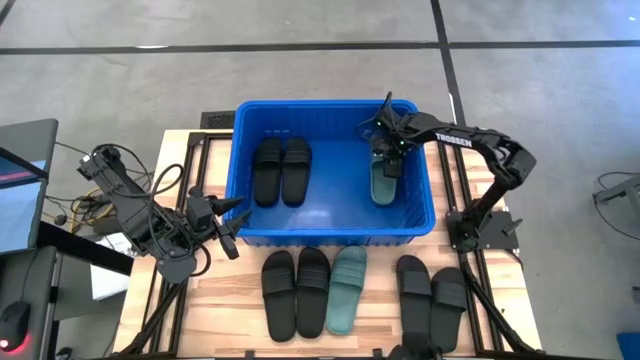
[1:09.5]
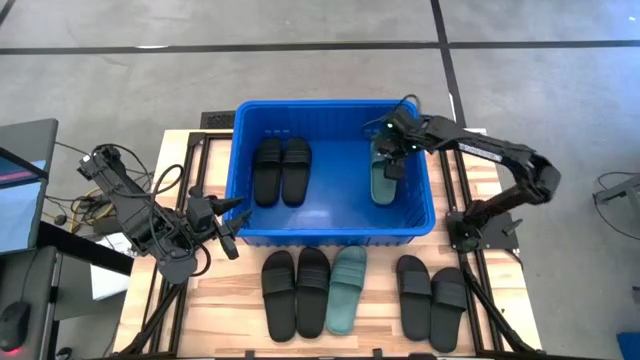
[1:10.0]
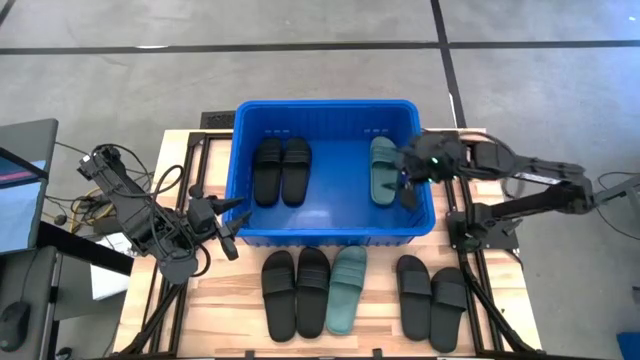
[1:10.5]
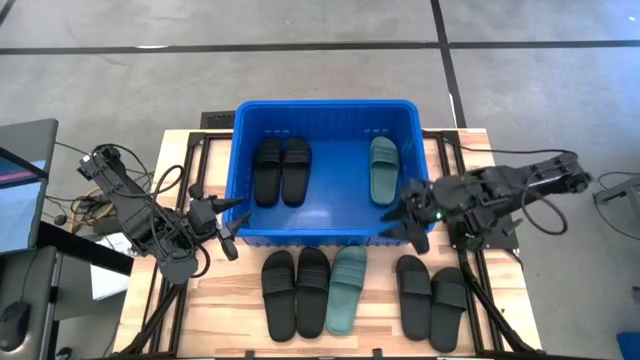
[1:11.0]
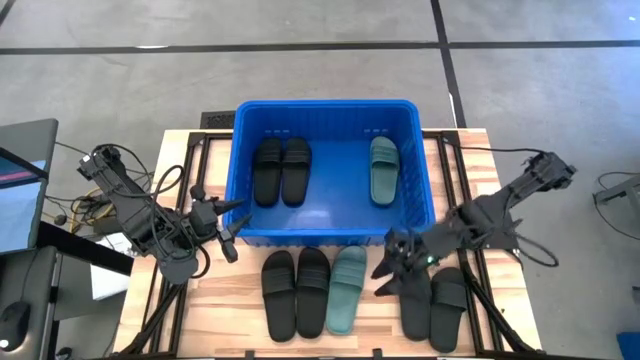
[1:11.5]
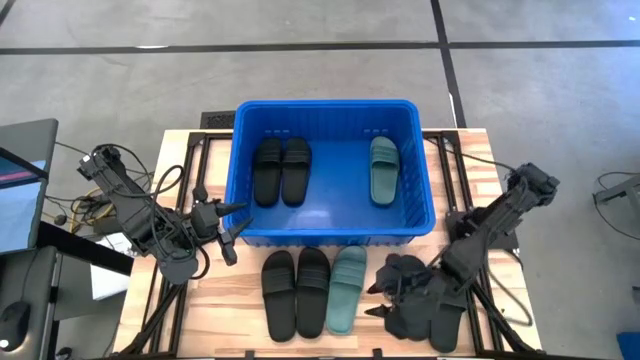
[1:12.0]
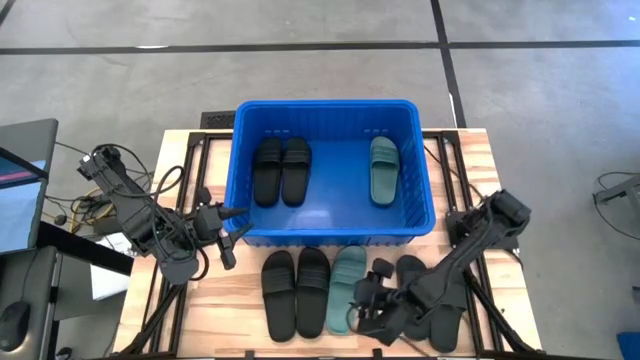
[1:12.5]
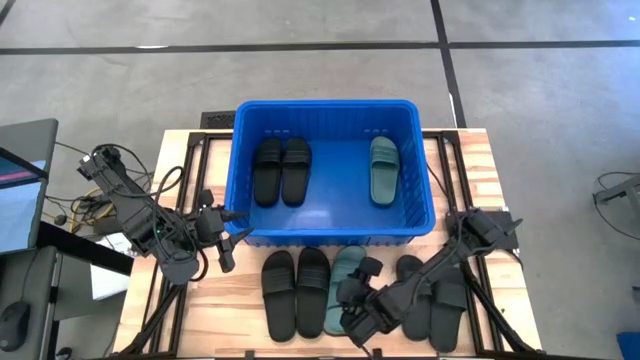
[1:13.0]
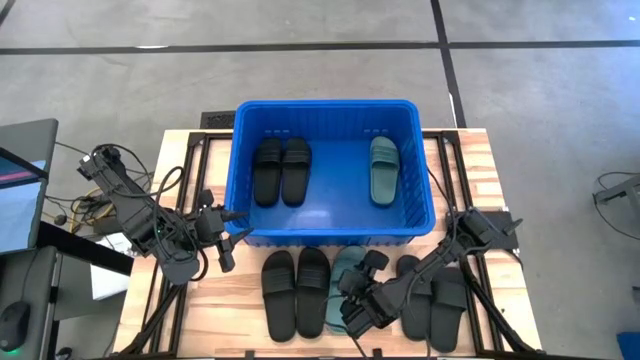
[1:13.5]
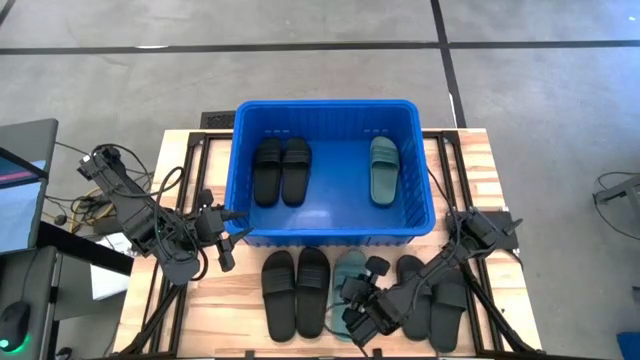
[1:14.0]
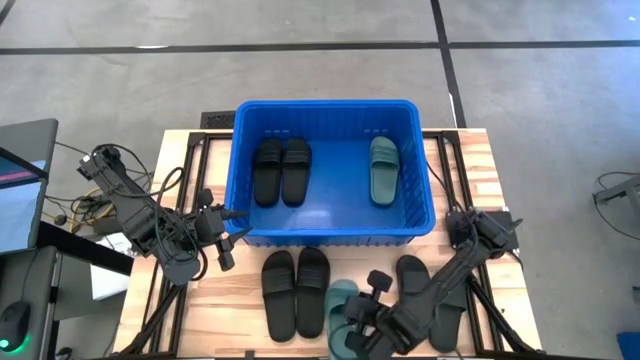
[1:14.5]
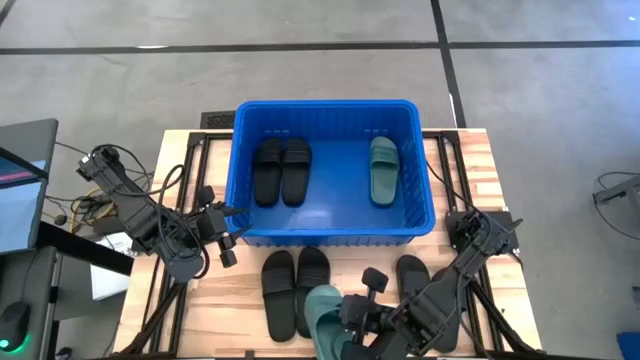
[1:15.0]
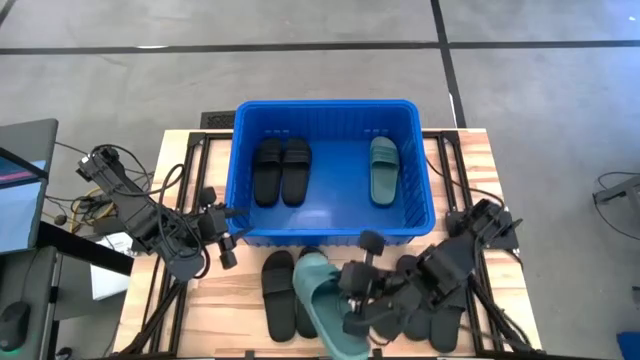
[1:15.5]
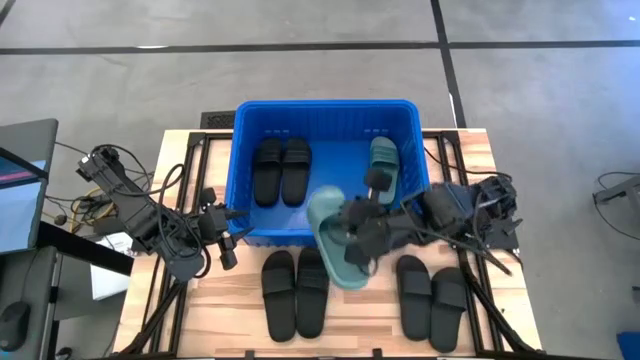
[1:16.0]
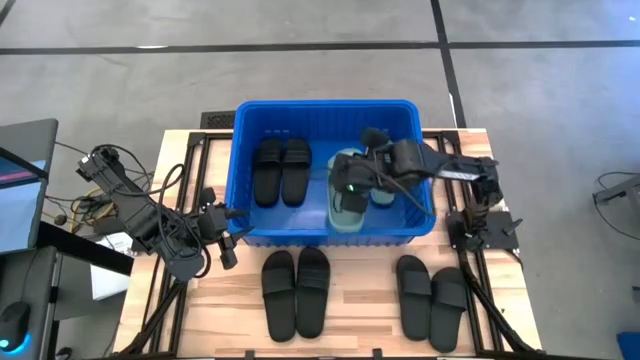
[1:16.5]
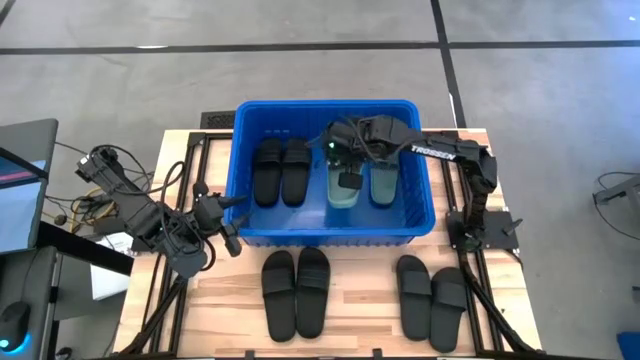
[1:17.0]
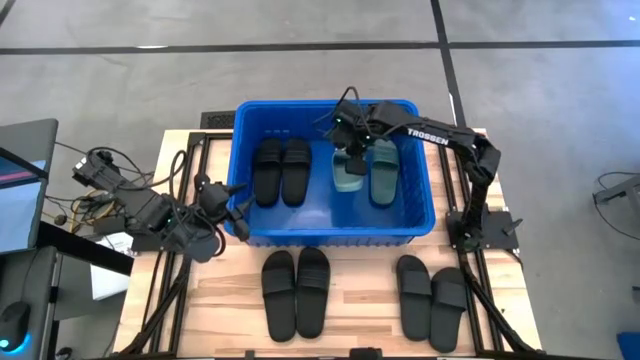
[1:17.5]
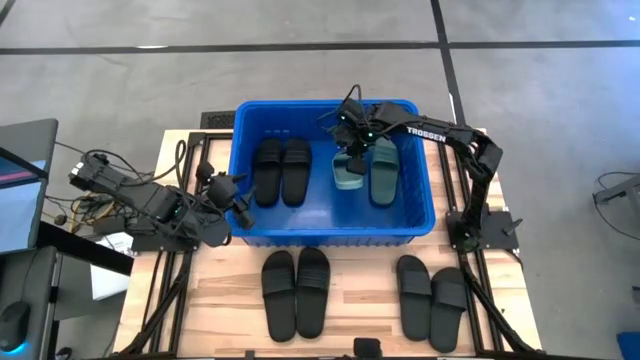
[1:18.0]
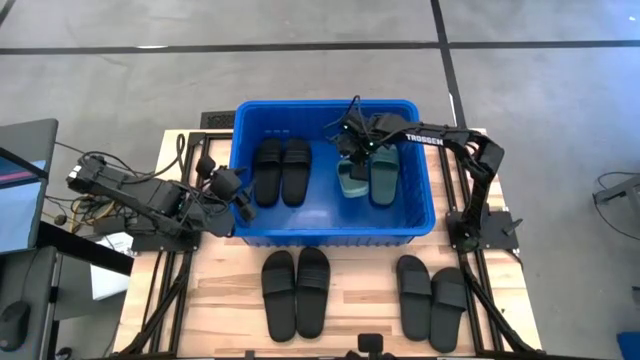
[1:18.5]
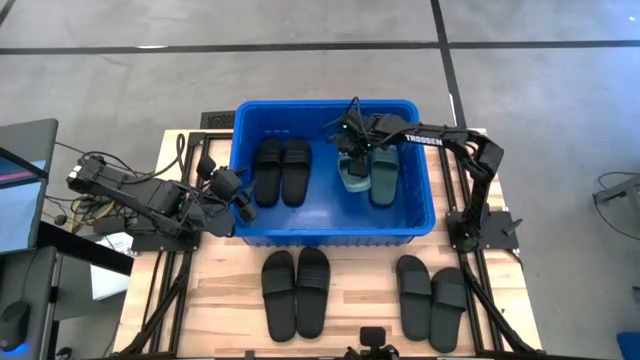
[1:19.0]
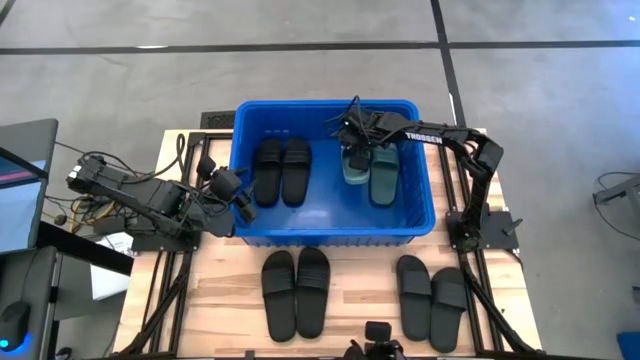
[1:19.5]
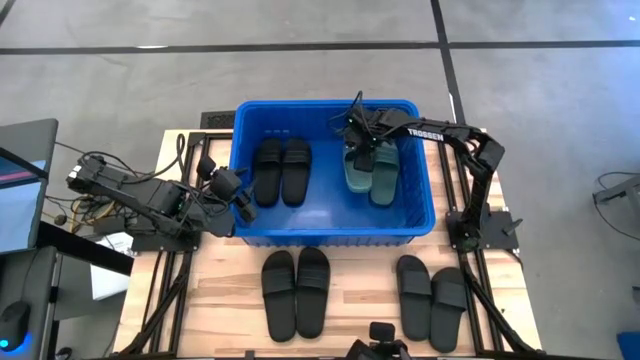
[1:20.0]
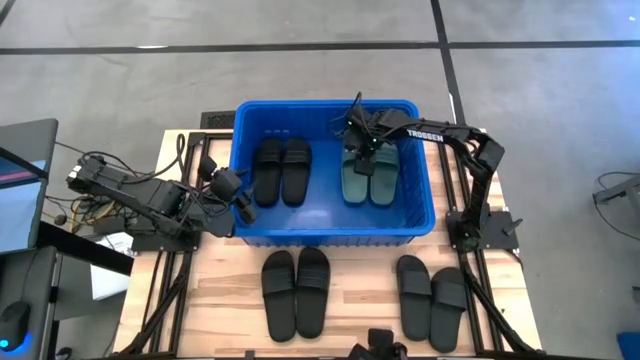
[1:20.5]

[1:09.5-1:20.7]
Task: Pick and place slides into bin
Put the green slide into the blue bin

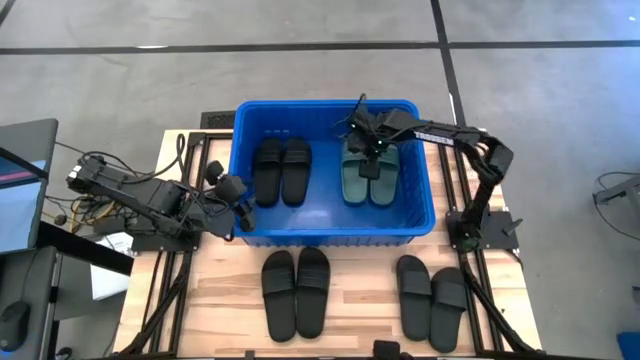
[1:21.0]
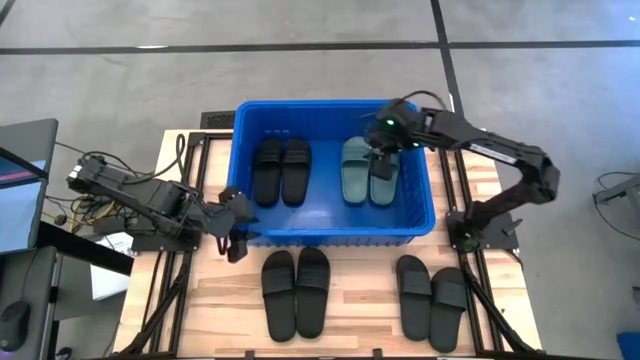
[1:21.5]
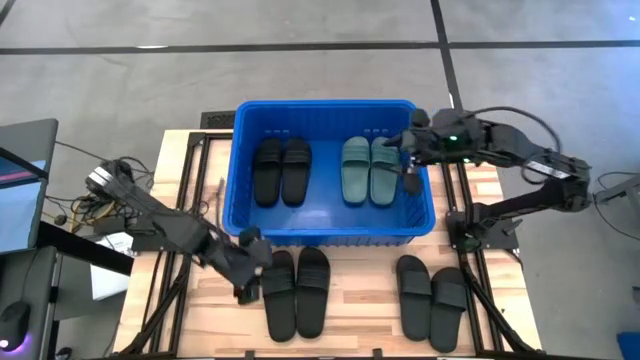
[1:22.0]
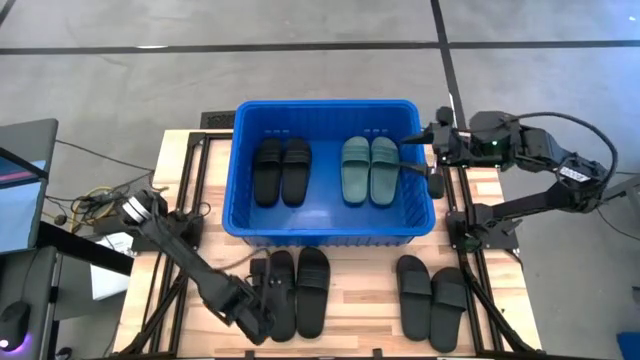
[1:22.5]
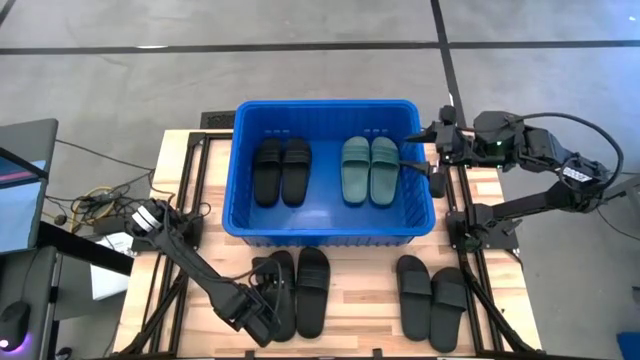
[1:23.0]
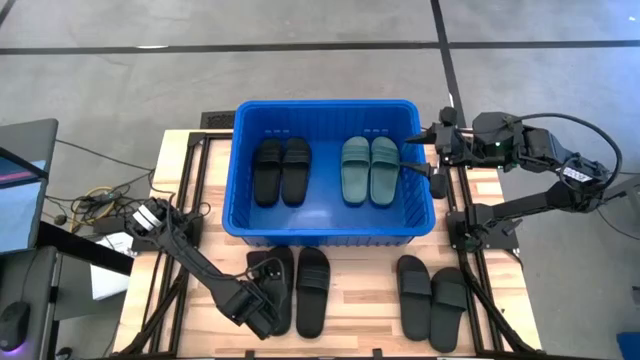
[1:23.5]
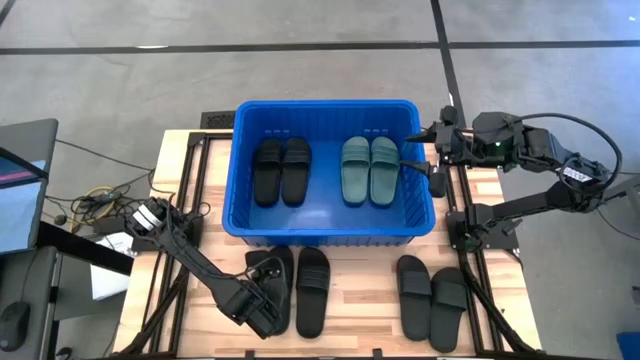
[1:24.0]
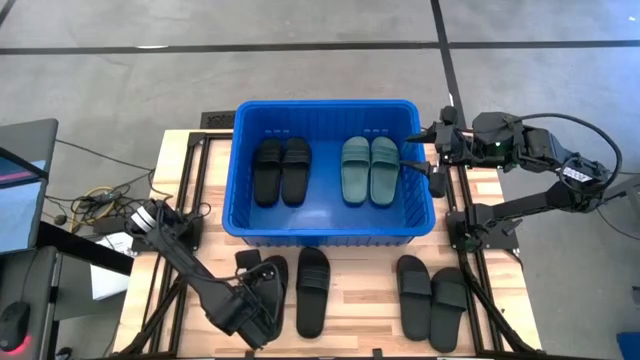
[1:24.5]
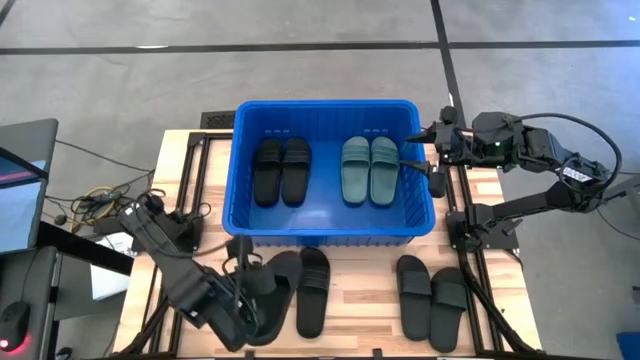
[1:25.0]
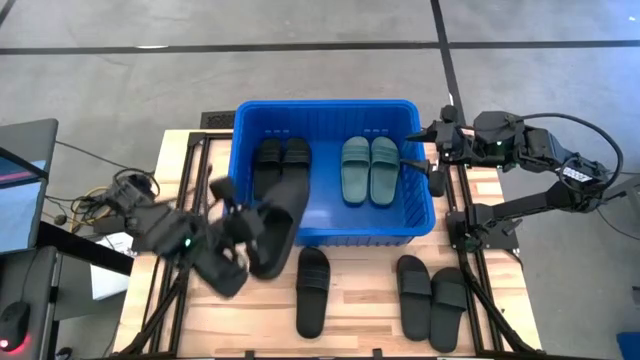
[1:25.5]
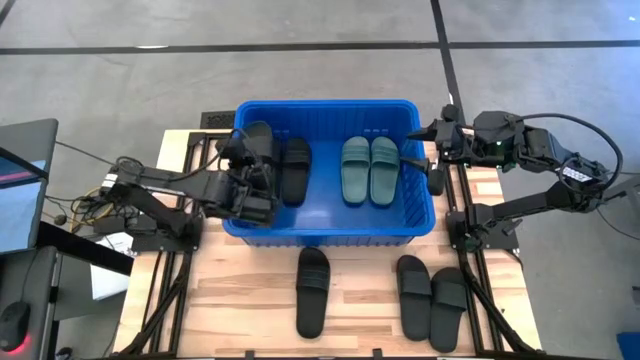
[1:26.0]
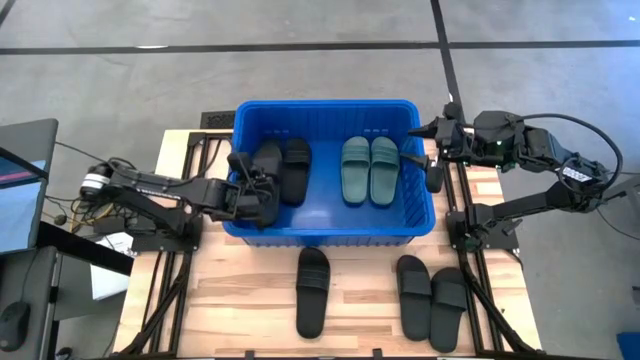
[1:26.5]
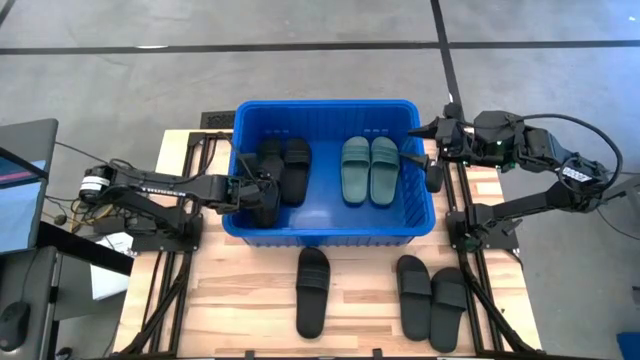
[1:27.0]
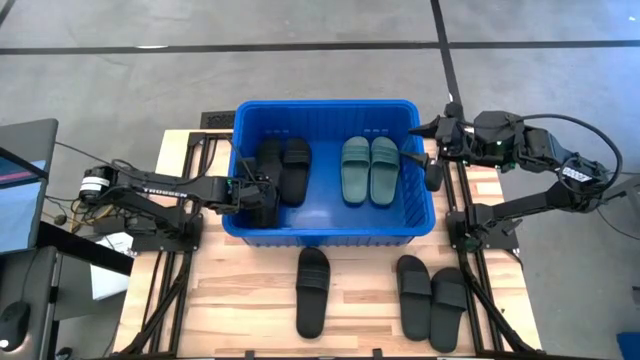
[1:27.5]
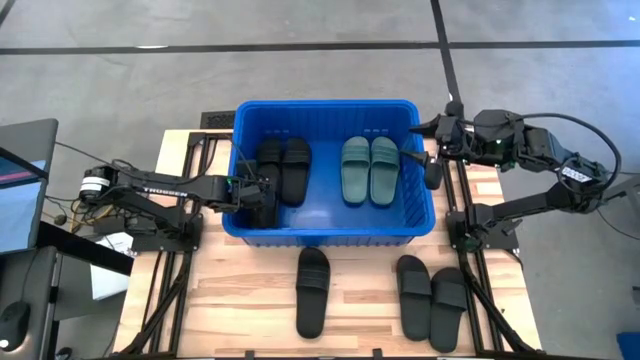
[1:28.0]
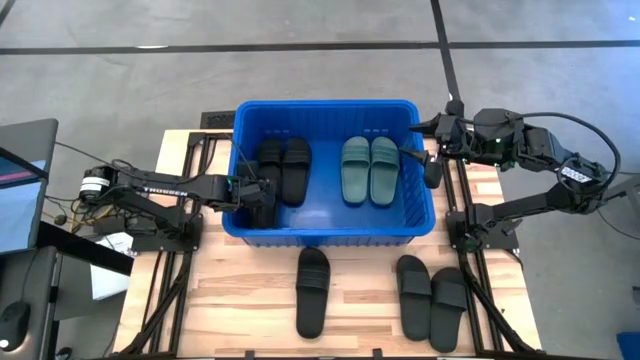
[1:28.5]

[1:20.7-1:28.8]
Put the black slide into the blue bin

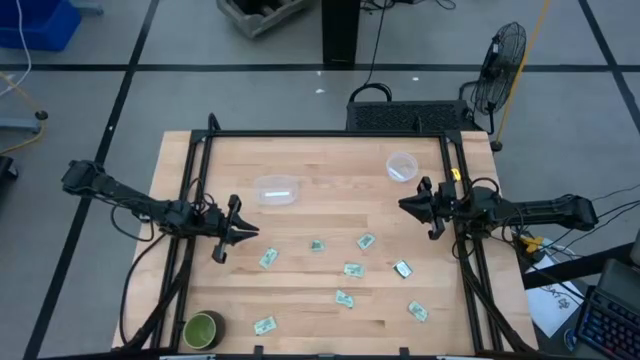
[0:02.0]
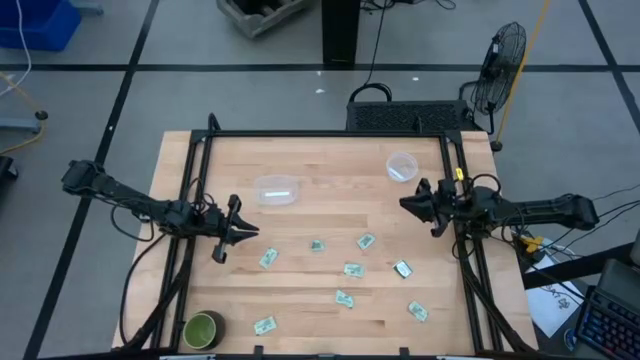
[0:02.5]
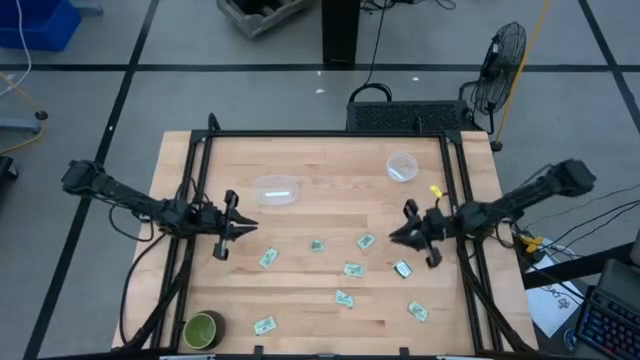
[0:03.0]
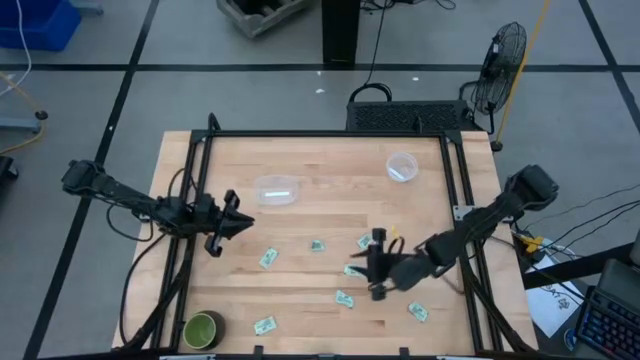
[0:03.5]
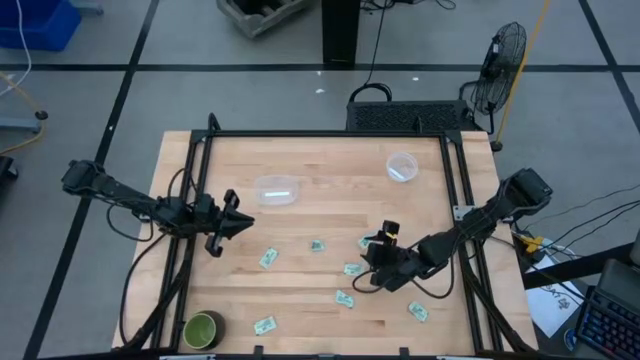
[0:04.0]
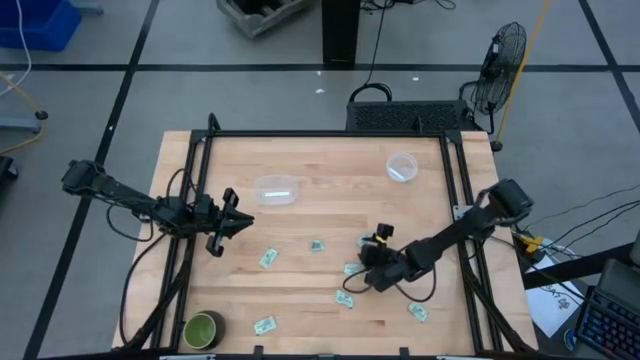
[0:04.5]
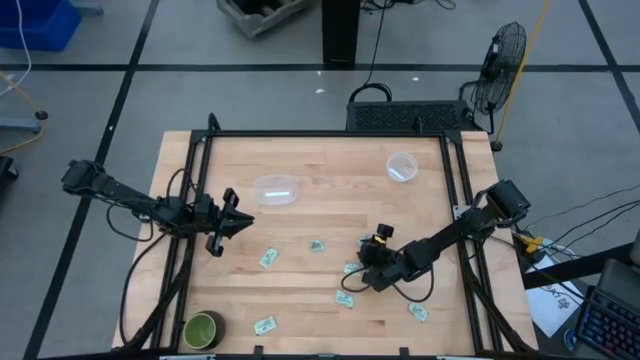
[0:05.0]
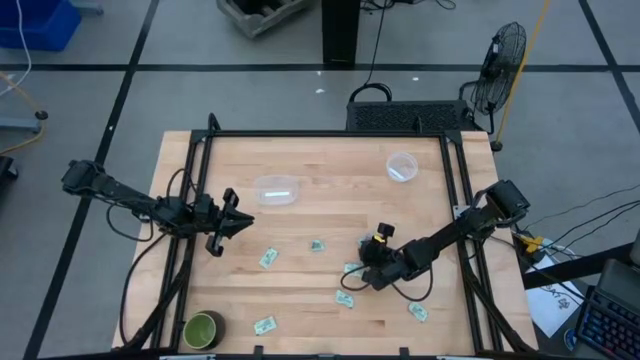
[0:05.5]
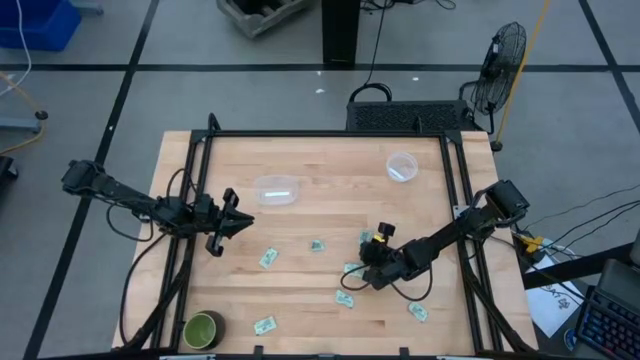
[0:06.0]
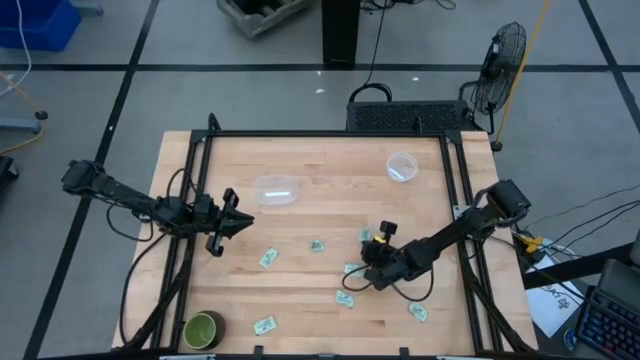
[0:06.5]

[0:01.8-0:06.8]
Task: Pick and place items into bin
Put the stevia packet into the right transparent bin
